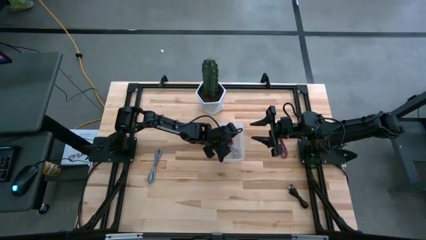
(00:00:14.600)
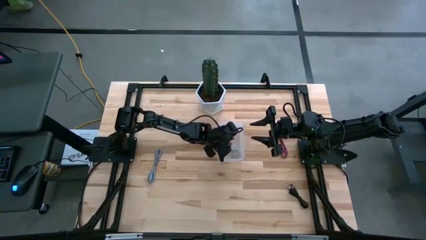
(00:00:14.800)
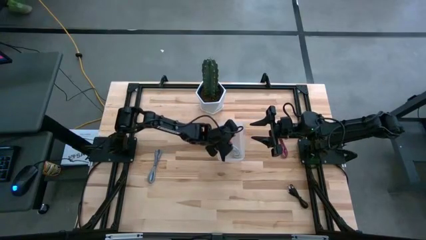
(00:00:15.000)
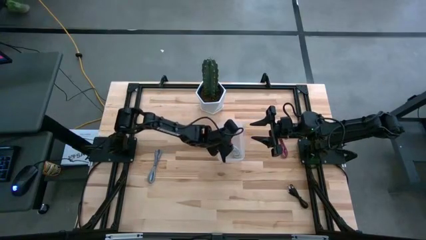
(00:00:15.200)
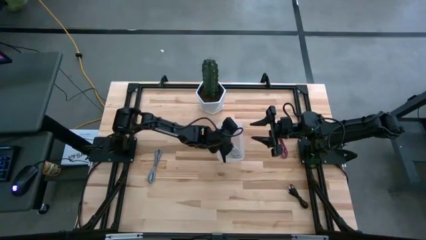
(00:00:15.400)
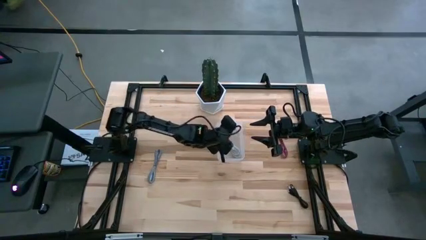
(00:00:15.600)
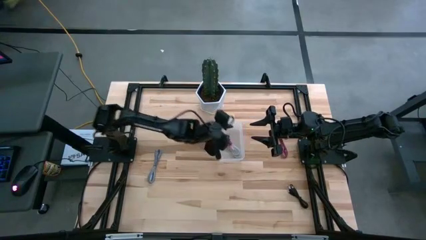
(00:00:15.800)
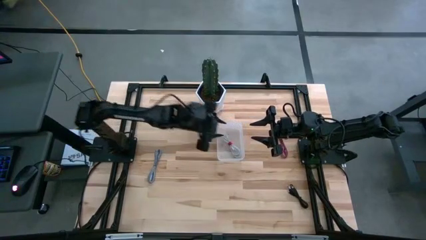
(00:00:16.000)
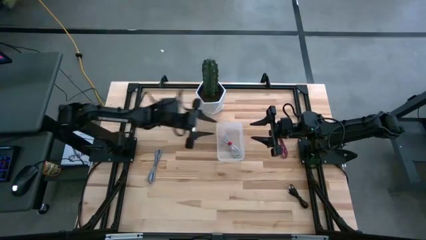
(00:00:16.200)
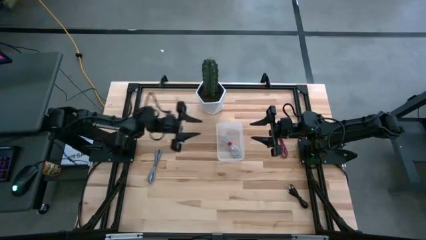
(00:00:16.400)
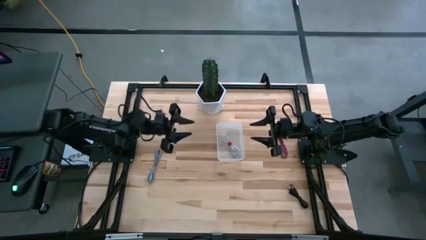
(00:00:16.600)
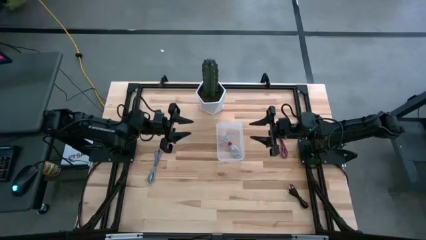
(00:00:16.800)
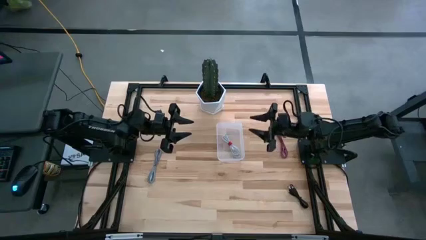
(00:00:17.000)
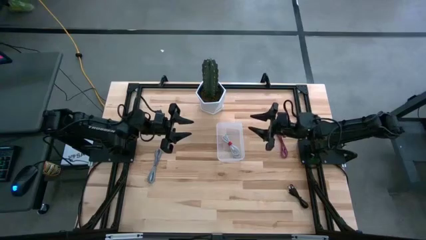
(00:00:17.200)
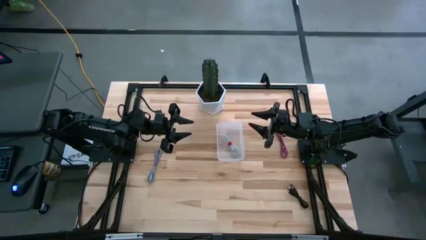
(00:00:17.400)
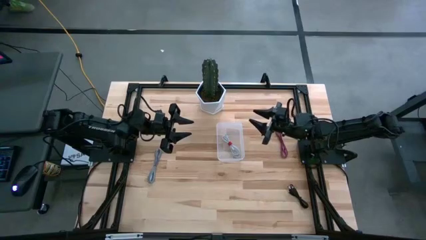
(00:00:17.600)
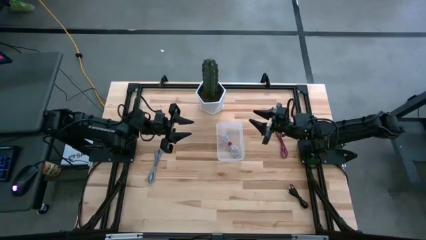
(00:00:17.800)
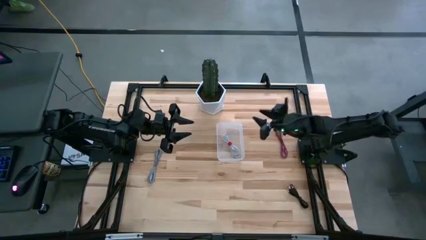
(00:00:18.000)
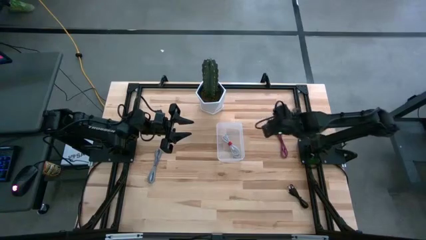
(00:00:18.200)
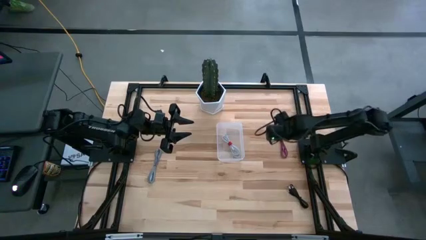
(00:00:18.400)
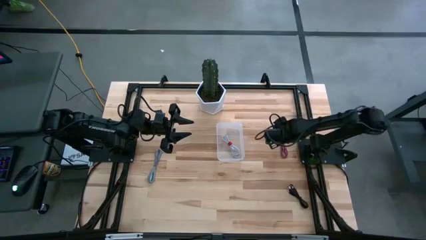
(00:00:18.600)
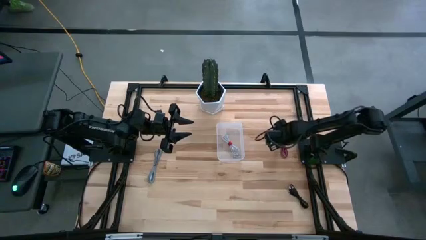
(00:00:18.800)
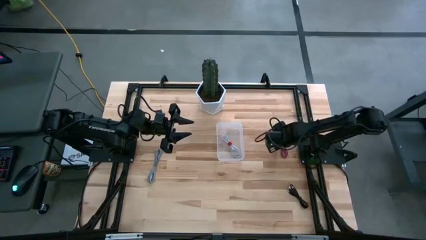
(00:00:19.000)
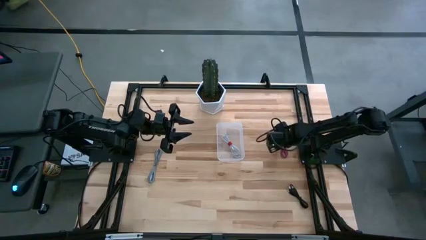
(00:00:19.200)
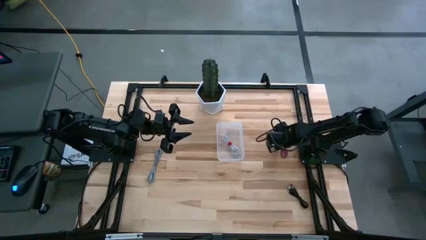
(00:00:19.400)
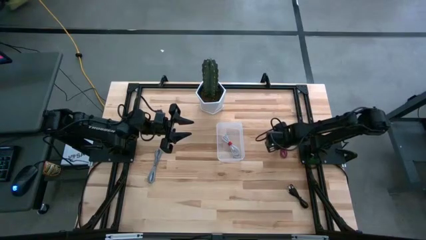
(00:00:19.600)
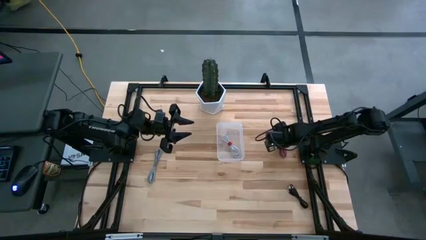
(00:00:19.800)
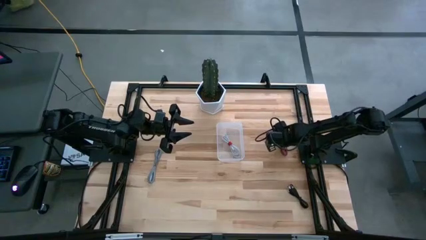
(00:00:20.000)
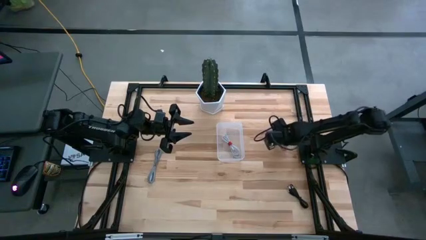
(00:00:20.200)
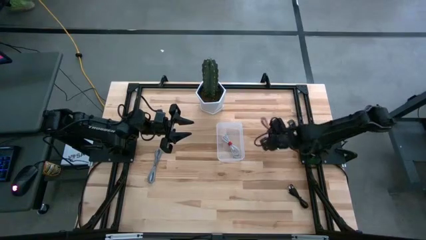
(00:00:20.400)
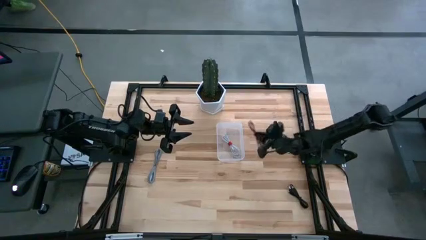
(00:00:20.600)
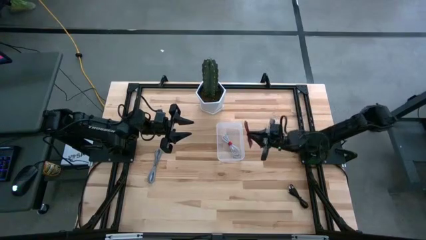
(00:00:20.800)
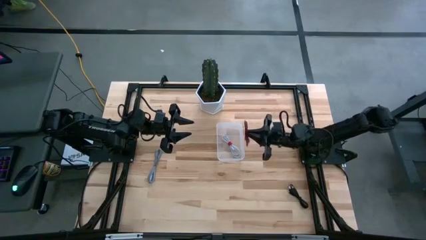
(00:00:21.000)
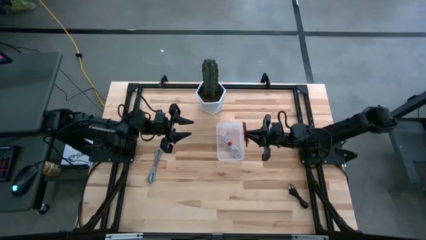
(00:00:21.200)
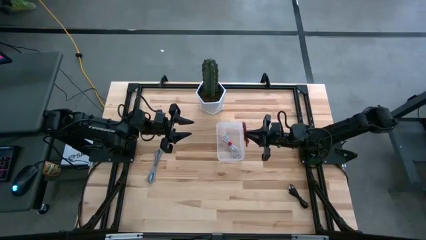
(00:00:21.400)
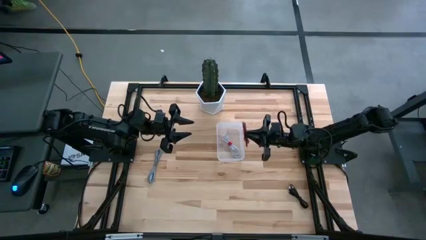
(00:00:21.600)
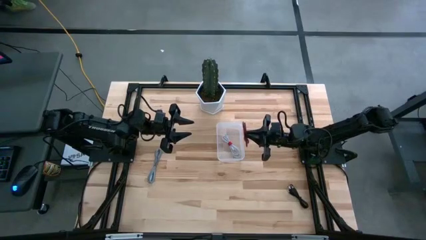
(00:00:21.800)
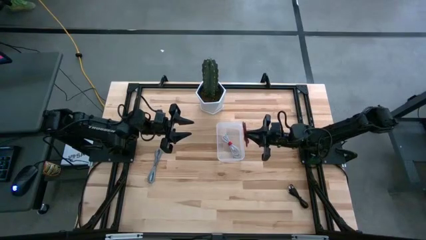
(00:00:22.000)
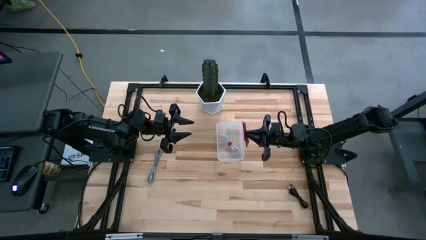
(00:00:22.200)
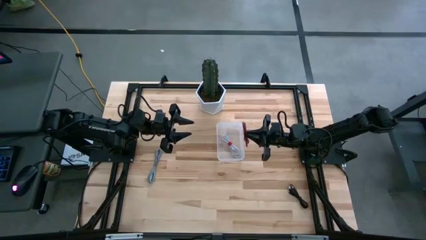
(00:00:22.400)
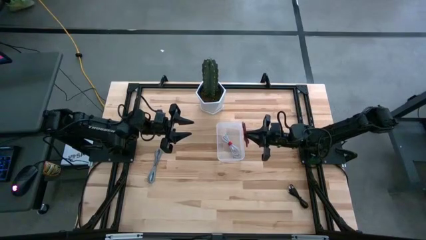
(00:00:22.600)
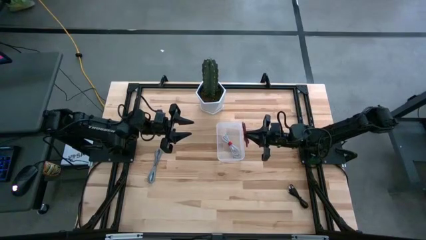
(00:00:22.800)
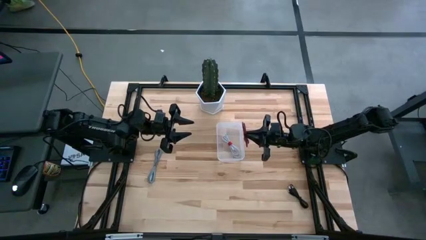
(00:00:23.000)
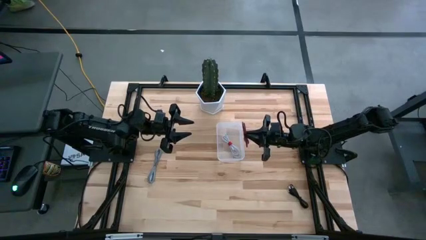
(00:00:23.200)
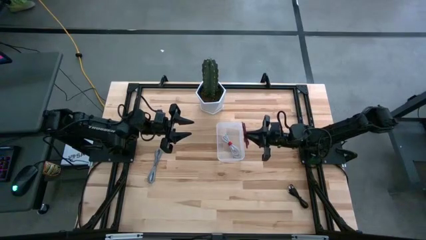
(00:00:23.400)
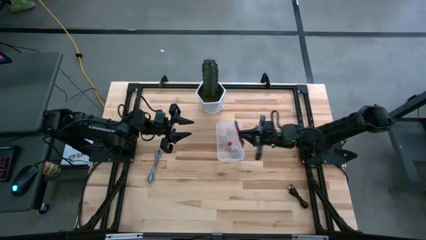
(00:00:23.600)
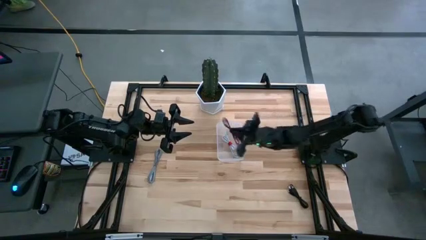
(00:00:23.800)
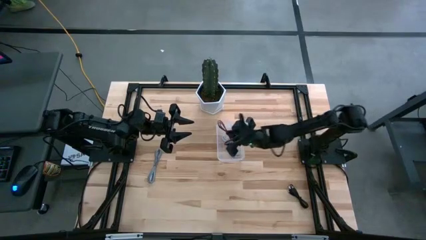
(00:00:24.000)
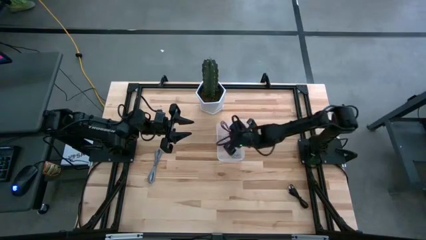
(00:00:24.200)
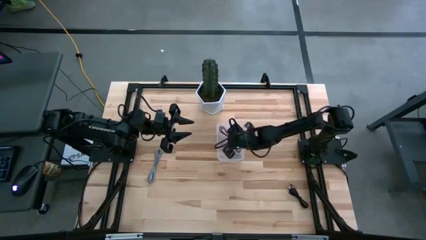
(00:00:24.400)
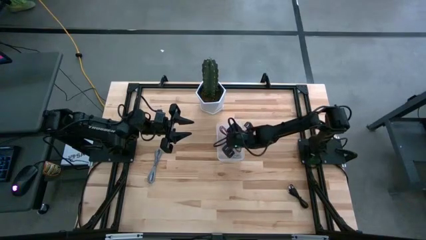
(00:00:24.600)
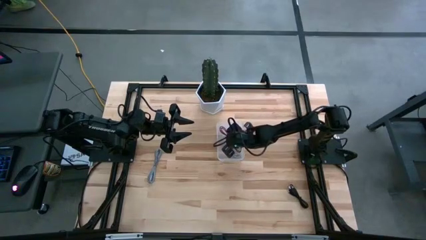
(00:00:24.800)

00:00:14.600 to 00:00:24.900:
Task: Pick and place USB-C Cables
Put the black pink charger cable into the transparent bin
